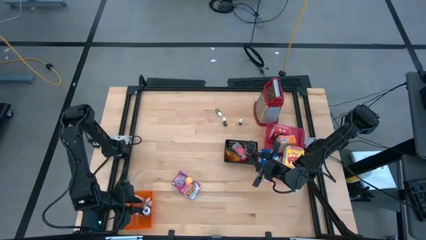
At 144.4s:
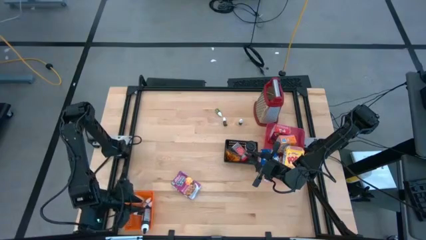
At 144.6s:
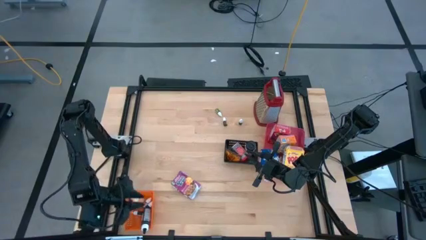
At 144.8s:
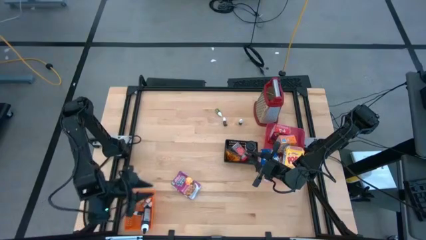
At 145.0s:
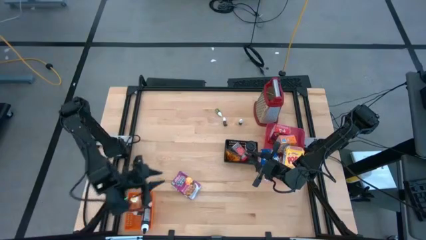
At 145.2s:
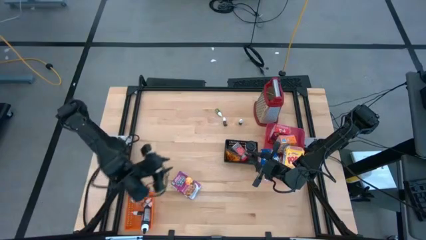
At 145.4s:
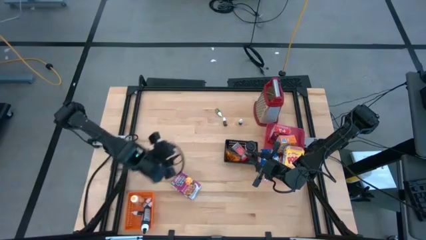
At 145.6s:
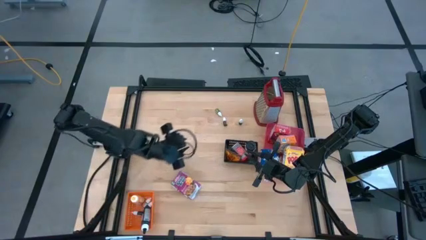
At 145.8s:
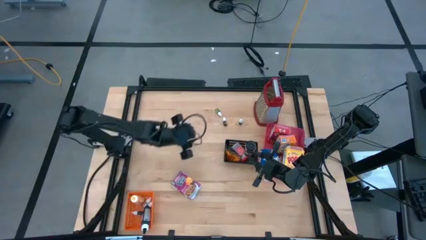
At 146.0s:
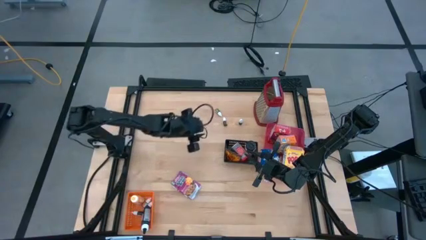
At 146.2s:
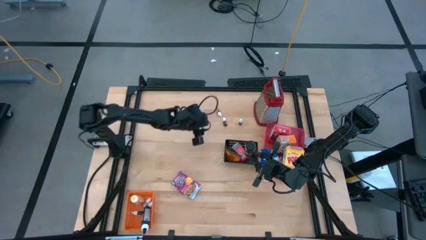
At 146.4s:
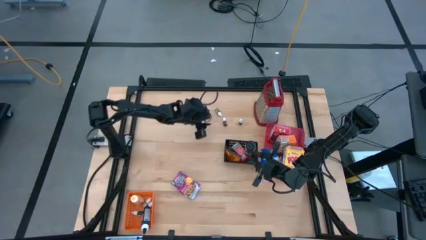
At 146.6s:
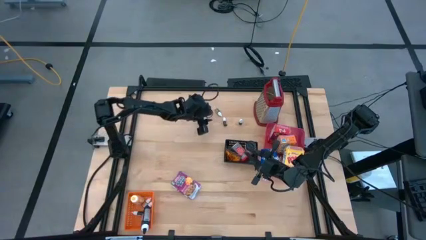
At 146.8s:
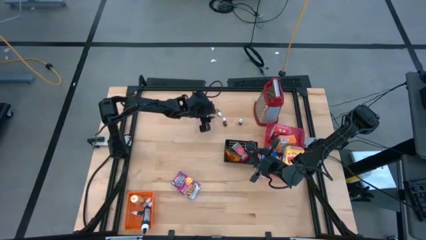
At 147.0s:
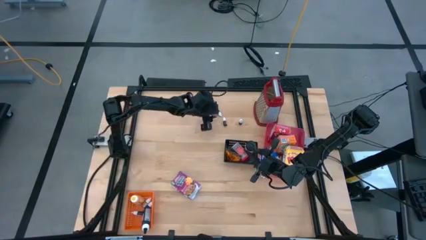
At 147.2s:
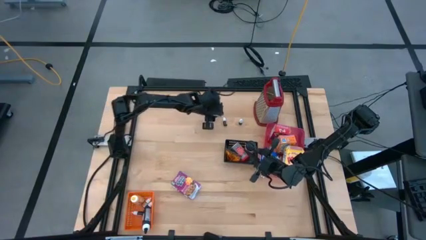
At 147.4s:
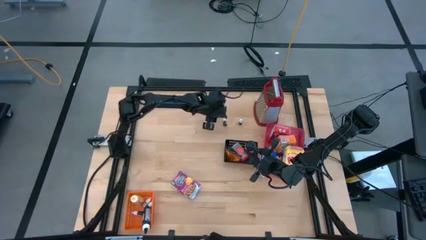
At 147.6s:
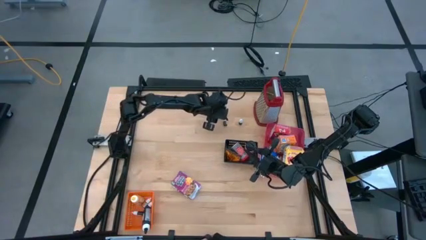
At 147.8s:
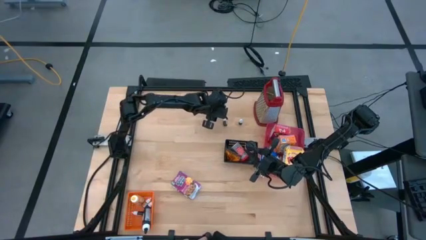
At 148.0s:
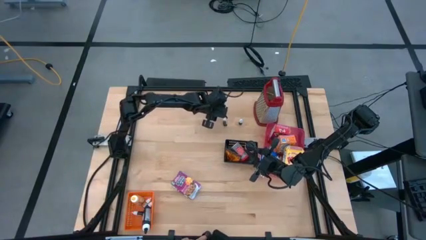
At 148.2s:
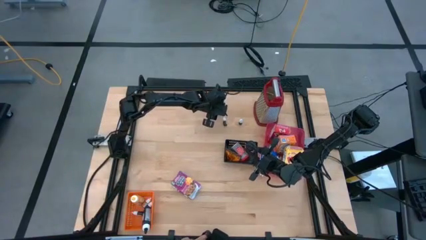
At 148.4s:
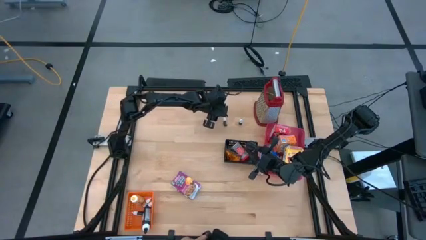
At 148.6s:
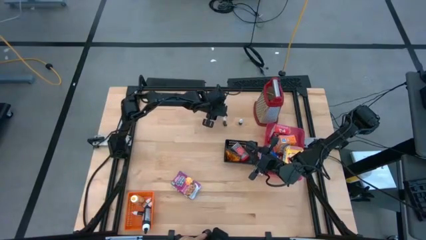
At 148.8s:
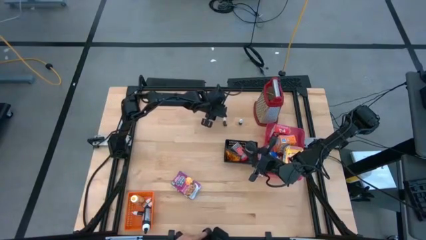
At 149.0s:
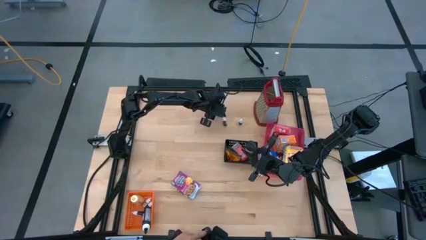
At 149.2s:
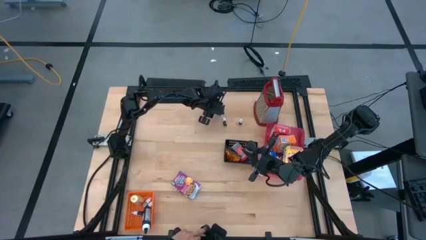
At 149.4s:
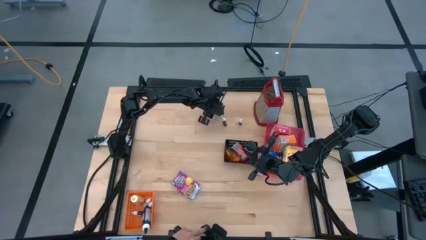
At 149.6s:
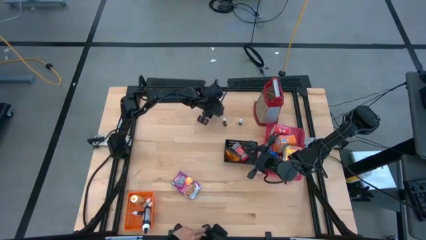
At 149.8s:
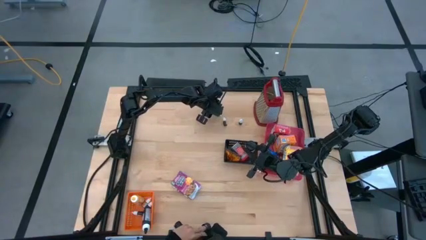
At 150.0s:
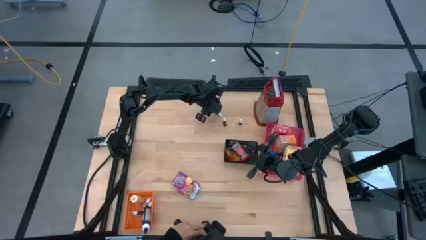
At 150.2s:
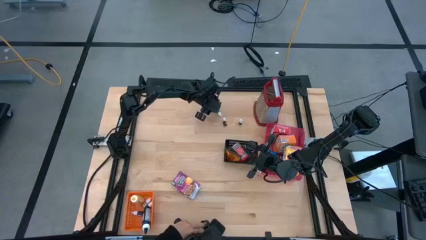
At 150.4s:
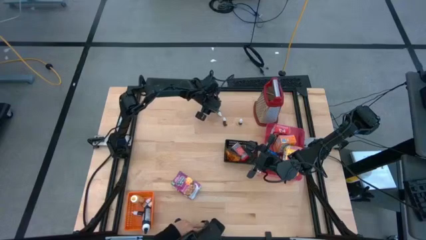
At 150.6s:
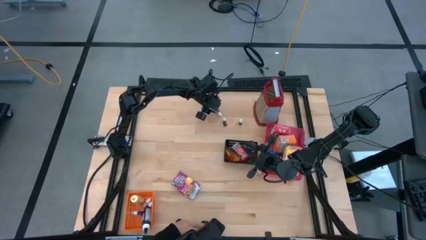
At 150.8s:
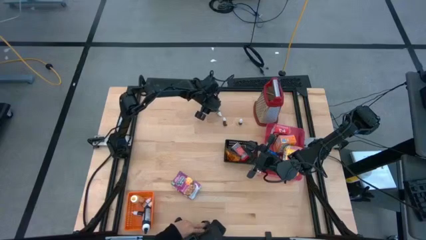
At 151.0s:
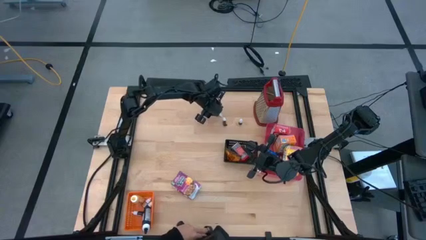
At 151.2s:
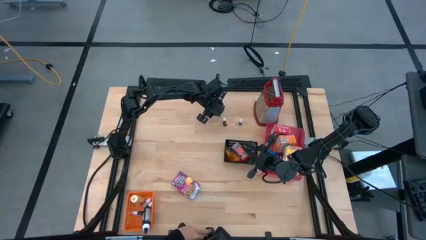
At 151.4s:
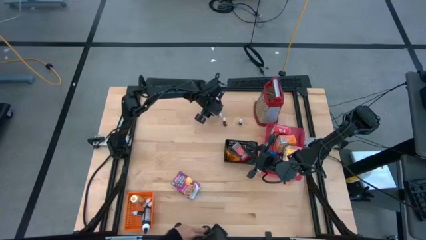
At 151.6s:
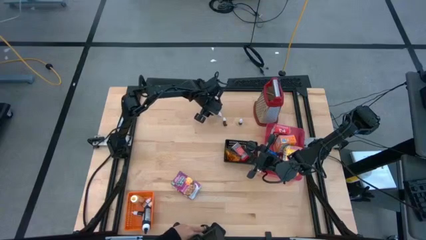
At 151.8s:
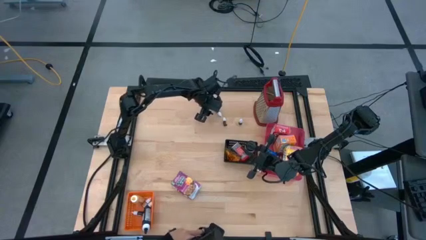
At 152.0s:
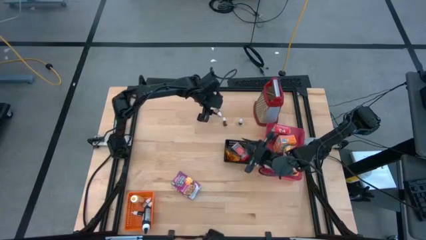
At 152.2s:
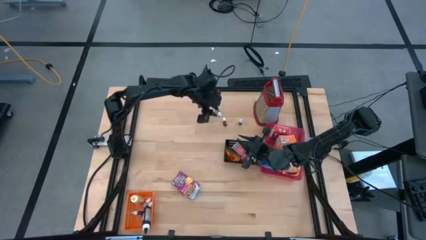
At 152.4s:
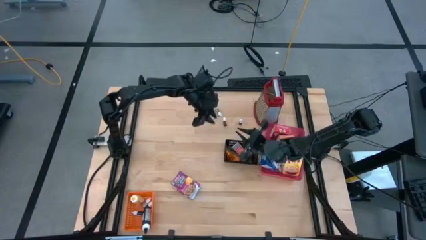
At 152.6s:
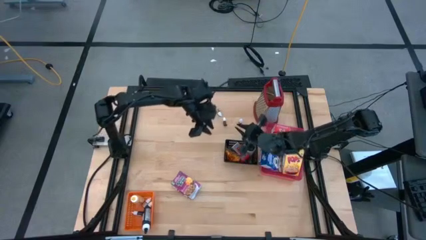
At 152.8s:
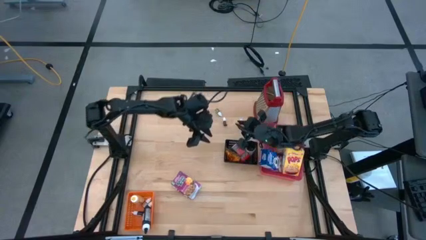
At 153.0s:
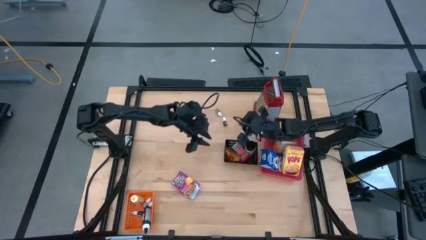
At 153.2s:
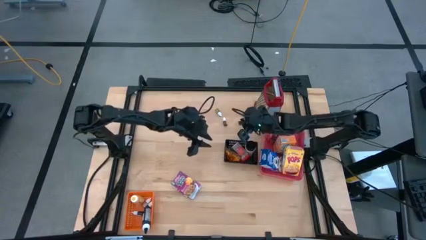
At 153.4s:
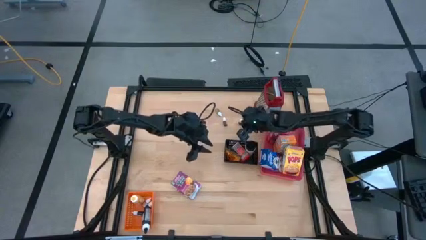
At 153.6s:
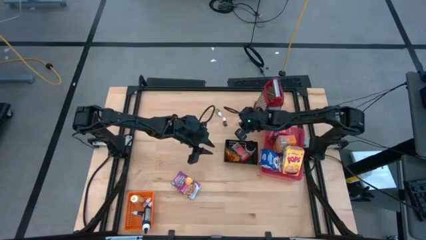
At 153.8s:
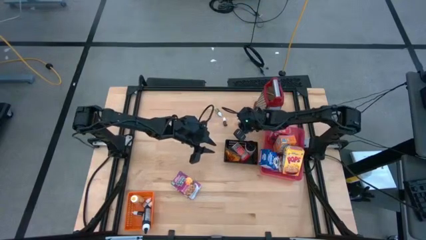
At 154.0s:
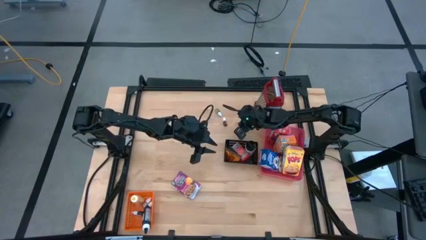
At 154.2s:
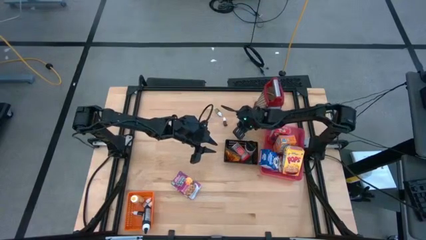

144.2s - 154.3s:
Task: Pick & Place Kitchen Items
Put the small purple food coloring bottle into the orange bin

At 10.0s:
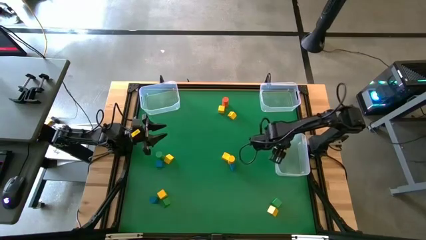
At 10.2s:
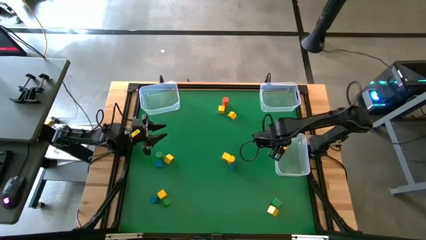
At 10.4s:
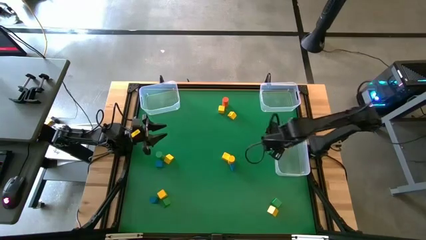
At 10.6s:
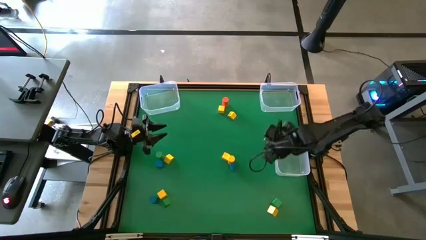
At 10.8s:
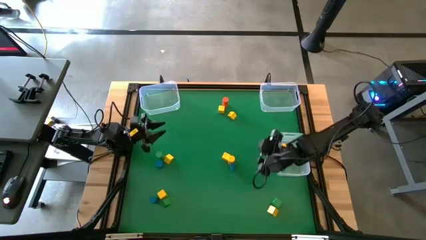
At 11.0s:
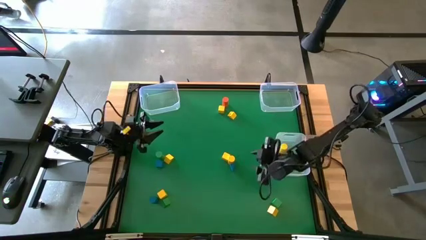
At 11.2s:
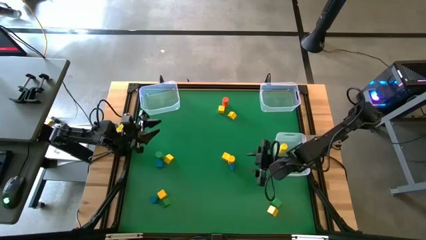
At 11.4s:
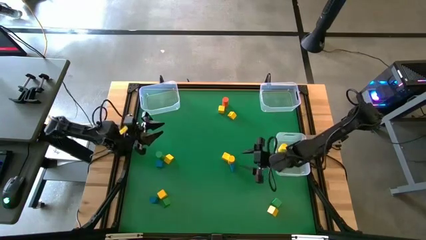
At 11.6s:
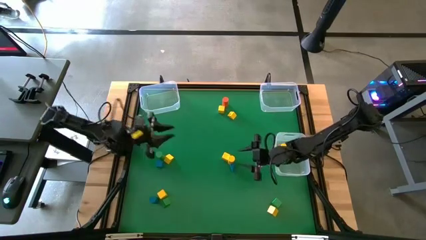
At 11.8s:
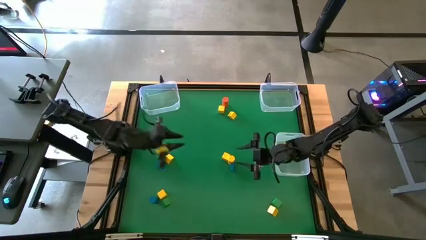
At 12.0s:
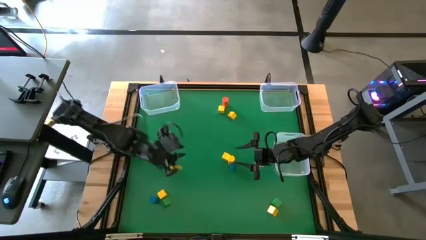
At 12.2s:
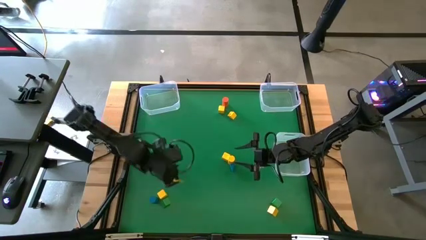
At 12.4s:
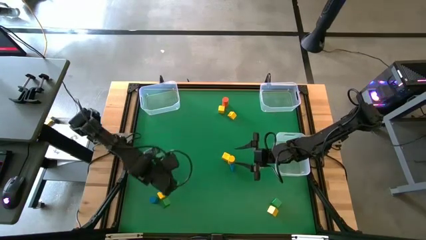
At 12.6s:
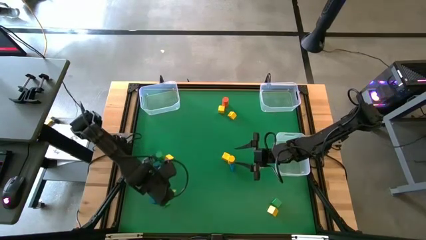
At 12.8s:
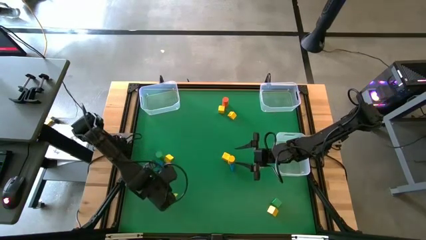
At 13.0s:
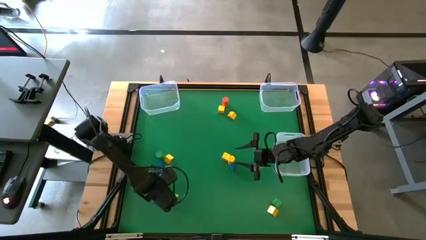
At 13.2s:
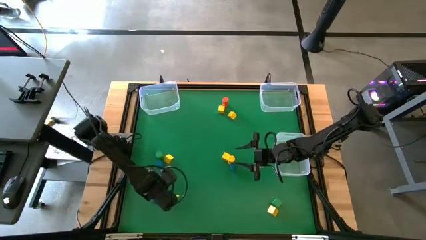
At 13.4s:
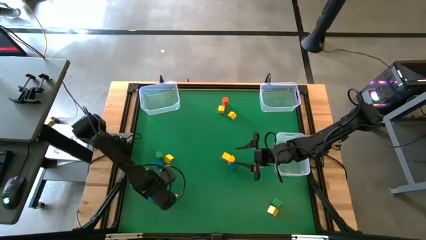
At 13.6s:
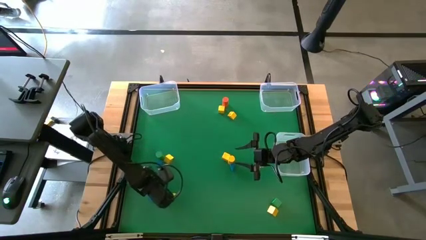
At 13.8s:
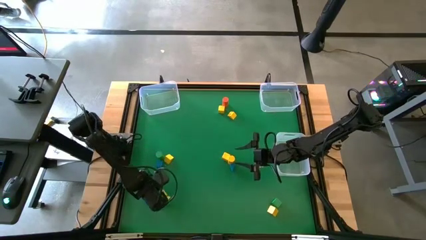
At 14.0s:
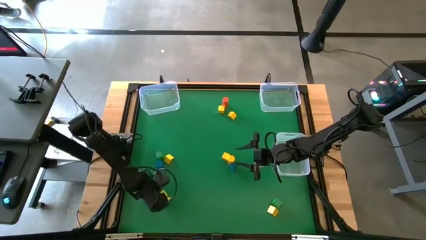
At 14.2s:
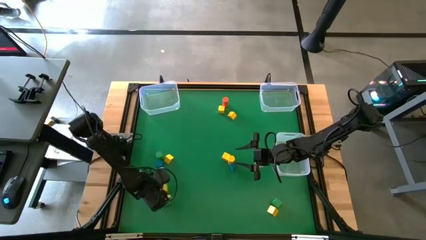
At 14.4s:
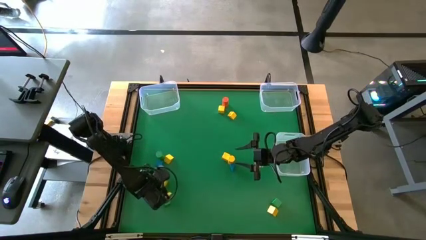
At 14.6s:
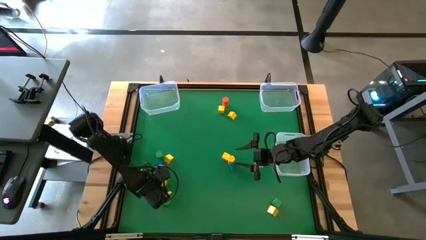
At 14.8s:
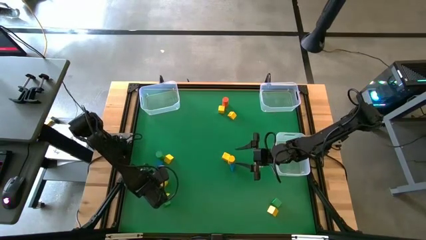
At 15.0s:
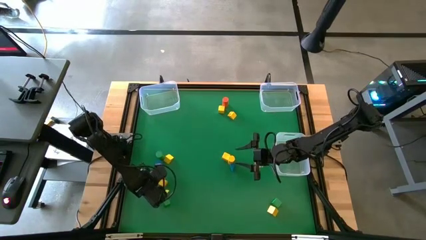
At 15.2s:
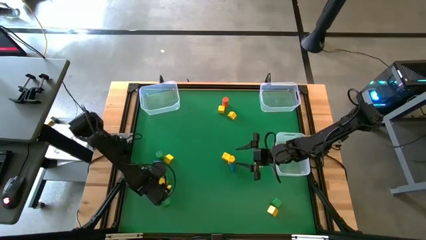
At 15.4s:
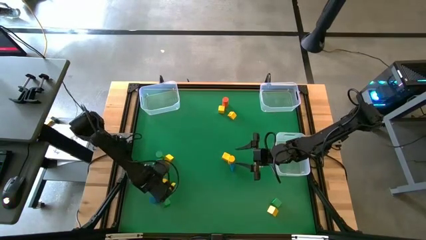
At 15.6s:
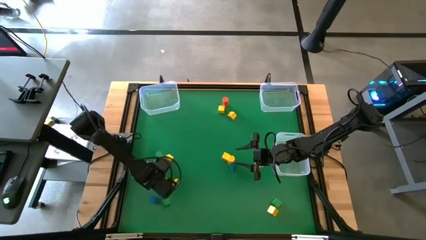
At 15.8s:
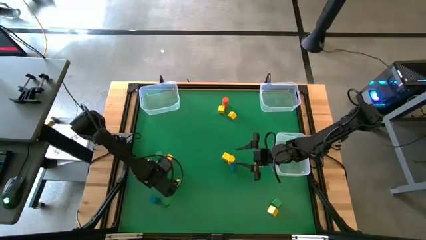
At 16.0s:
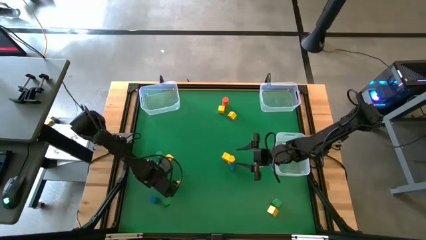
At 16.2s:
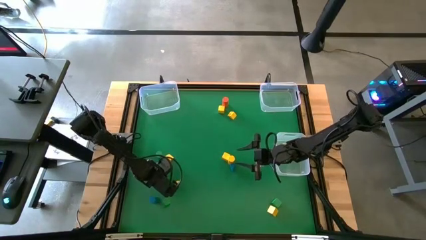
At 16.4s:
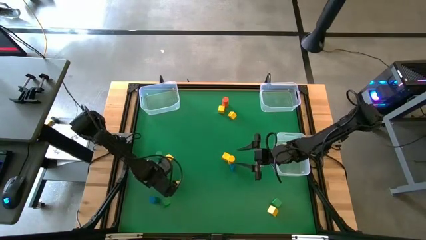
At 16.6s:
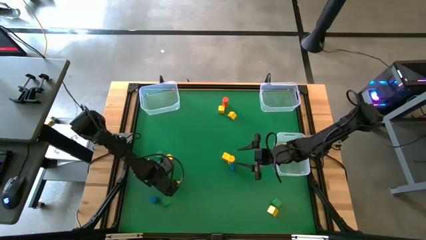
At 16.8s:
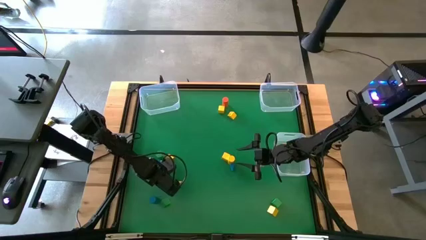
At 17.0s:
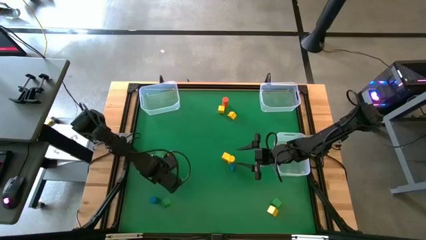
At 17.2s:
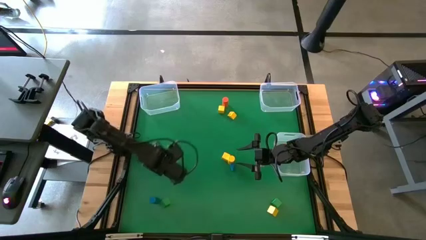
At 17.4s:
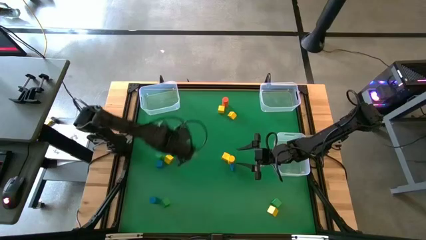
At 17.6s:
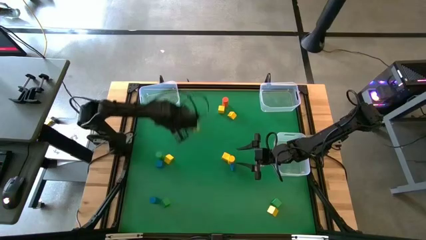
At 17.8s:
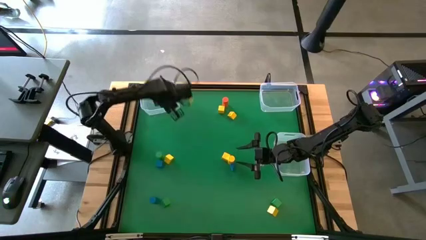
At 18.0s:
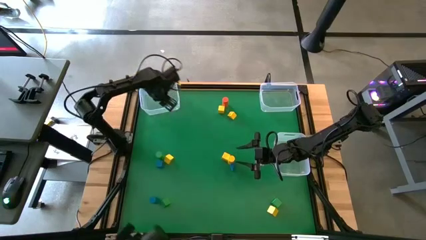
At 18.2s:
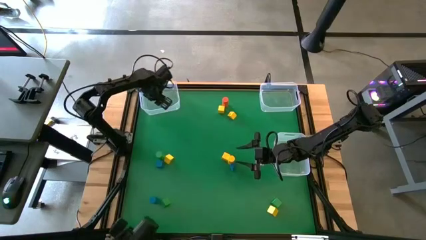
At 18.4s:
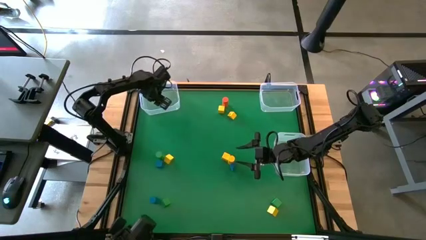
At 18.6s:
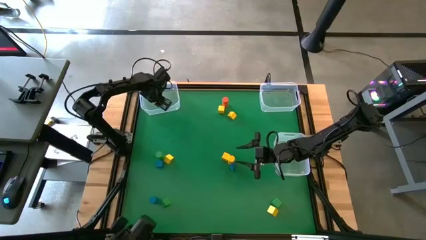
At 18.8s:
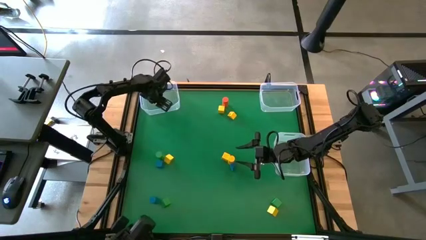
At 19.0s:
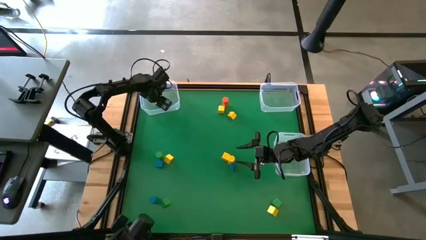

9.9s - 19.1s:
Task: Sort blocks by size
Put the yellow cube block into the top left transparent bin
